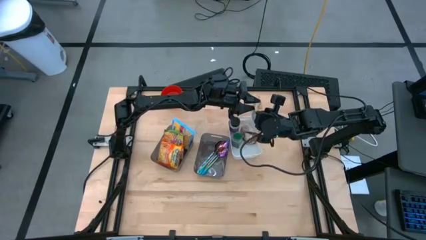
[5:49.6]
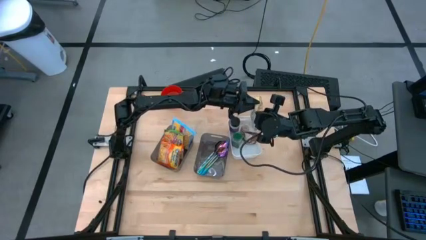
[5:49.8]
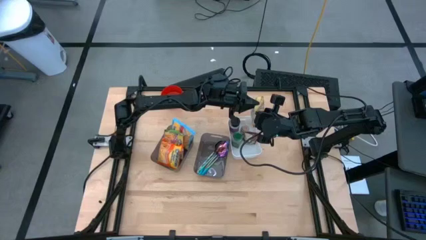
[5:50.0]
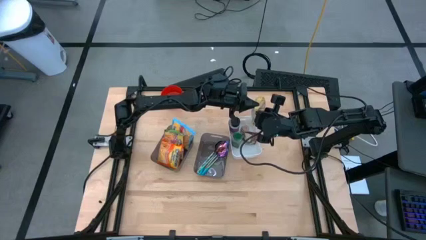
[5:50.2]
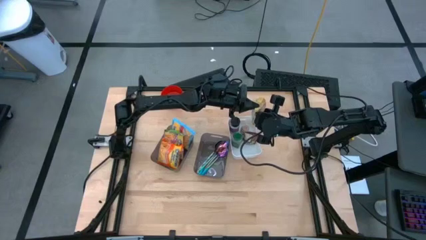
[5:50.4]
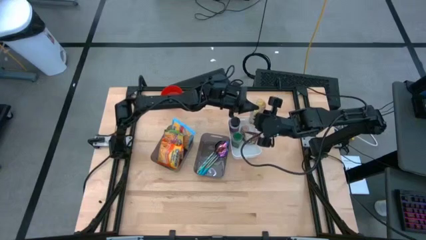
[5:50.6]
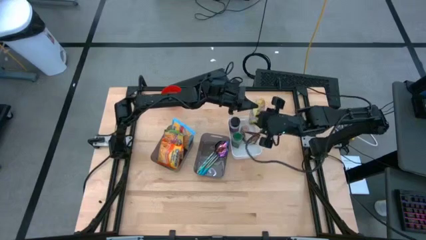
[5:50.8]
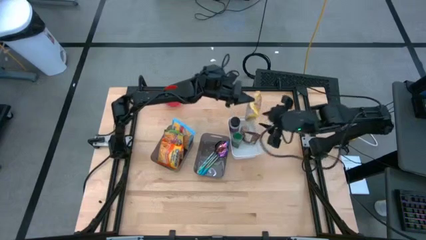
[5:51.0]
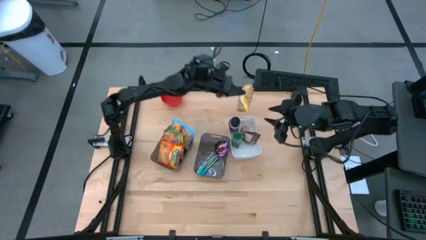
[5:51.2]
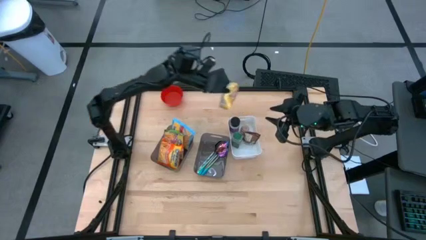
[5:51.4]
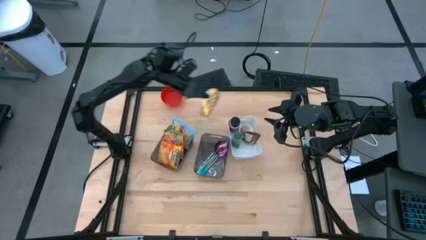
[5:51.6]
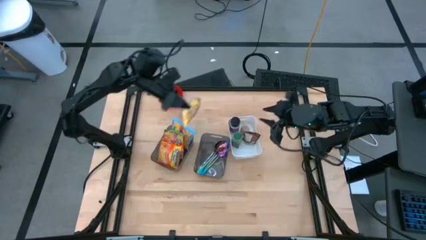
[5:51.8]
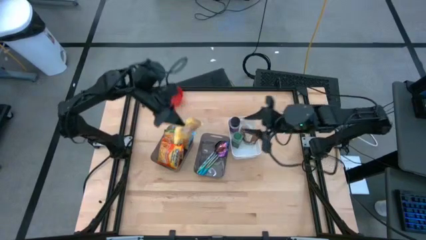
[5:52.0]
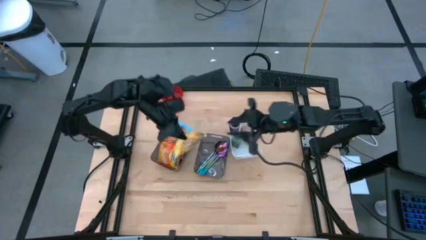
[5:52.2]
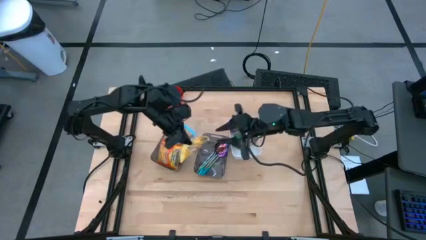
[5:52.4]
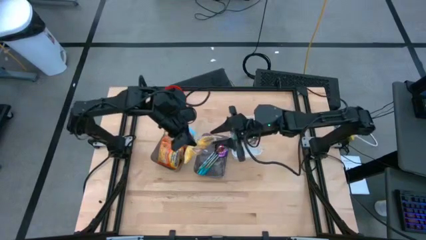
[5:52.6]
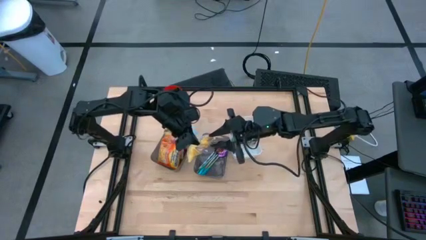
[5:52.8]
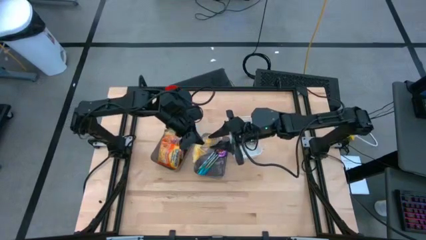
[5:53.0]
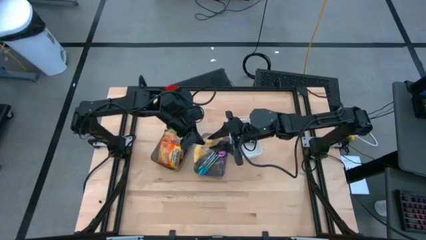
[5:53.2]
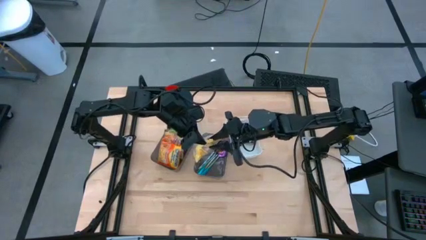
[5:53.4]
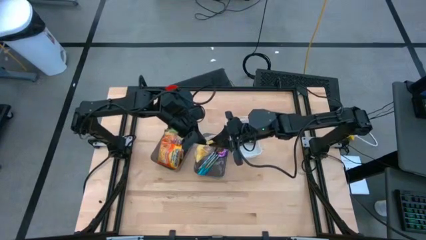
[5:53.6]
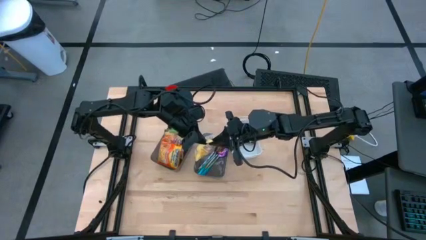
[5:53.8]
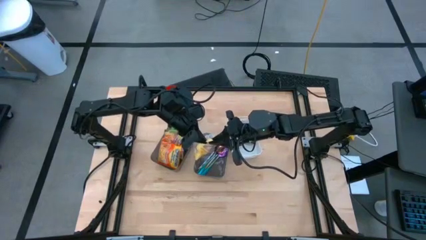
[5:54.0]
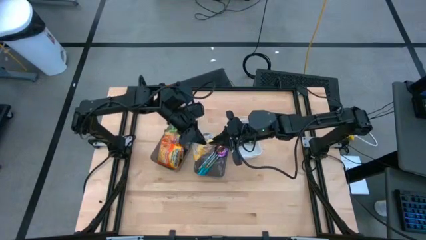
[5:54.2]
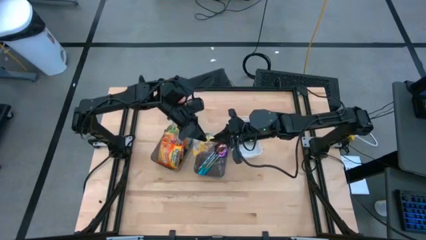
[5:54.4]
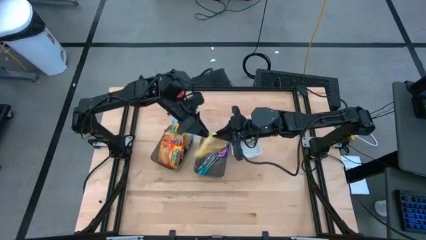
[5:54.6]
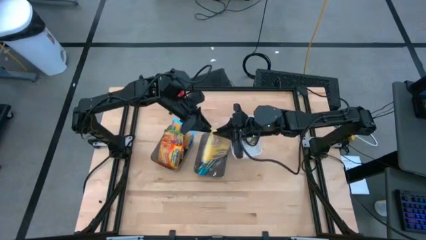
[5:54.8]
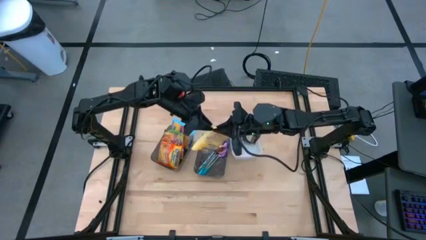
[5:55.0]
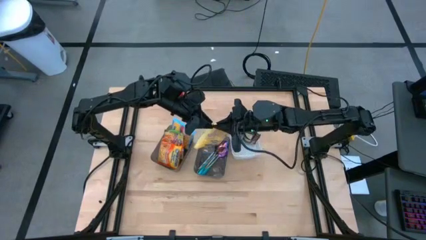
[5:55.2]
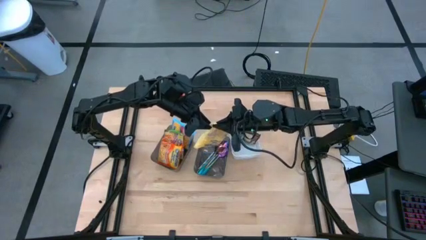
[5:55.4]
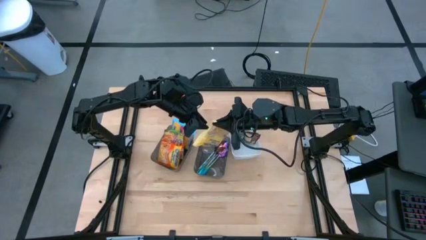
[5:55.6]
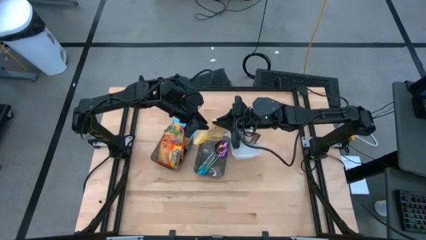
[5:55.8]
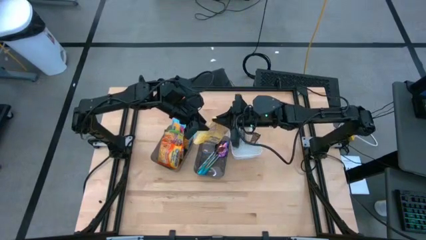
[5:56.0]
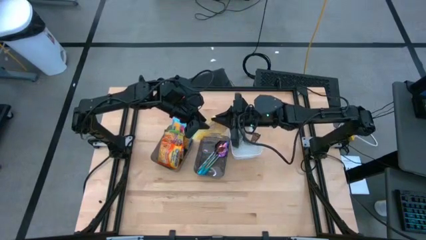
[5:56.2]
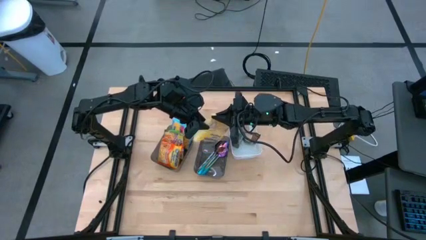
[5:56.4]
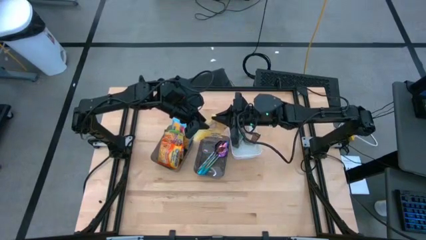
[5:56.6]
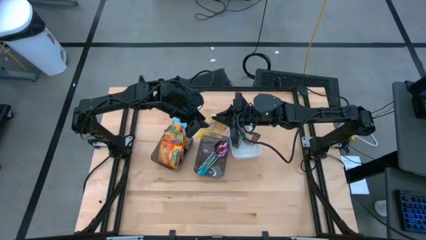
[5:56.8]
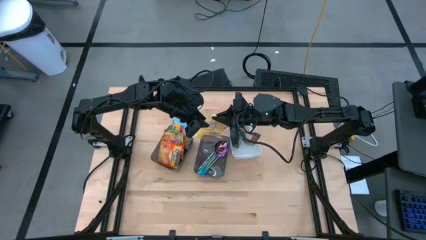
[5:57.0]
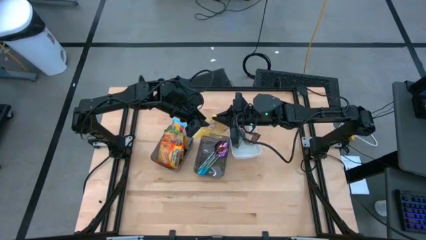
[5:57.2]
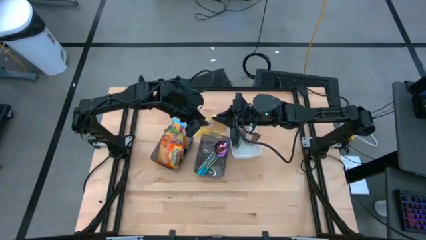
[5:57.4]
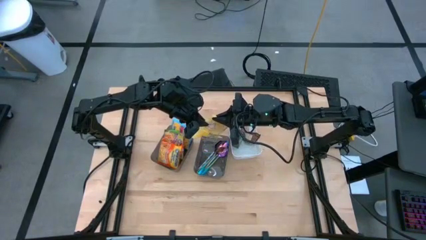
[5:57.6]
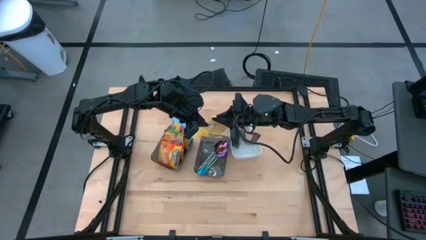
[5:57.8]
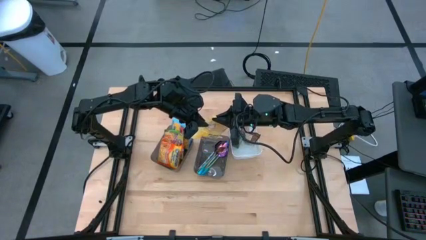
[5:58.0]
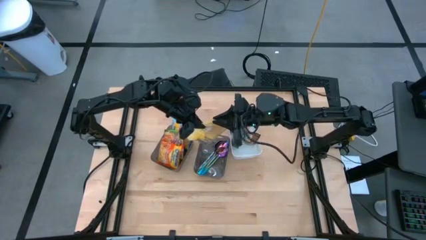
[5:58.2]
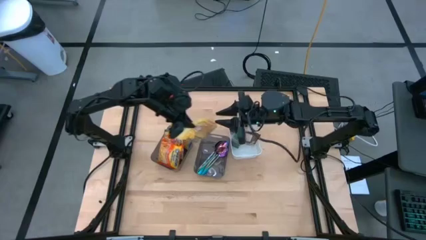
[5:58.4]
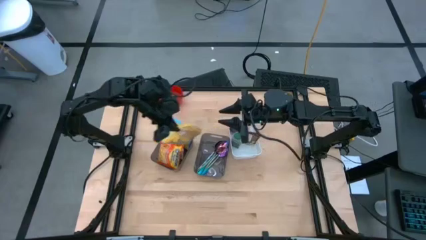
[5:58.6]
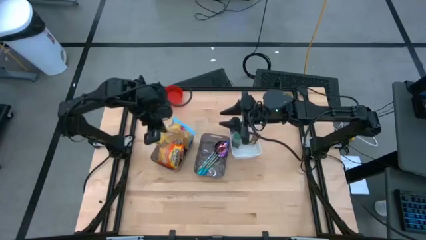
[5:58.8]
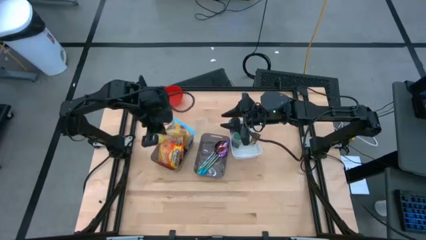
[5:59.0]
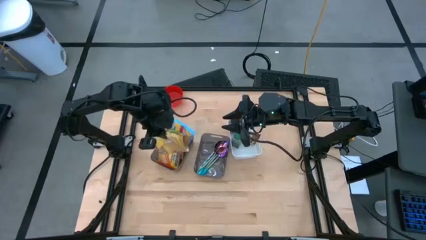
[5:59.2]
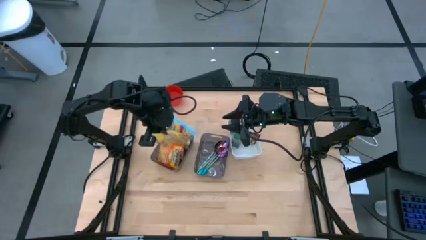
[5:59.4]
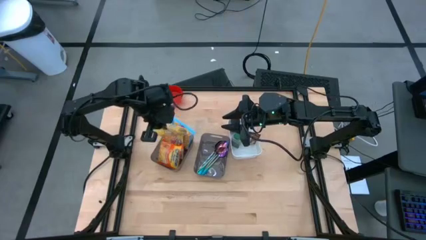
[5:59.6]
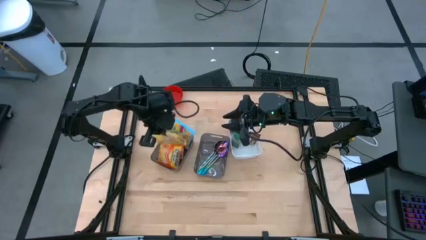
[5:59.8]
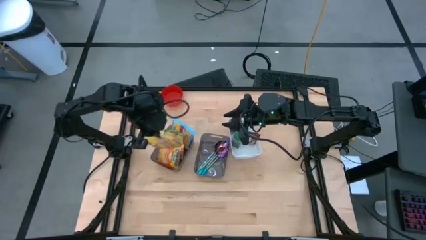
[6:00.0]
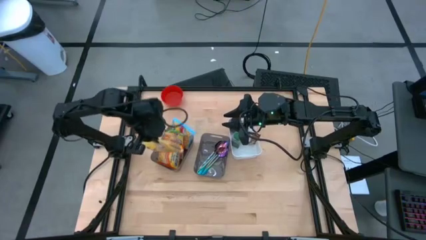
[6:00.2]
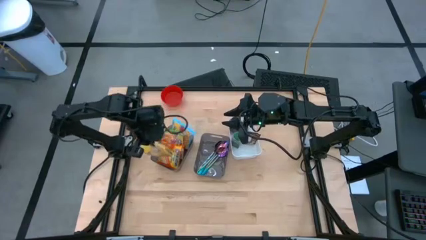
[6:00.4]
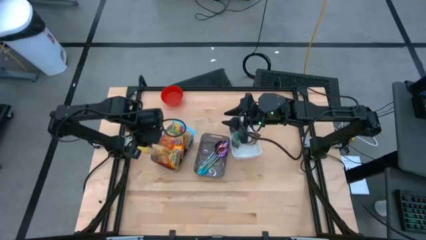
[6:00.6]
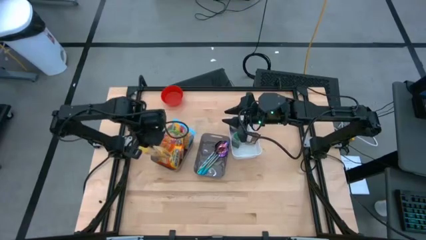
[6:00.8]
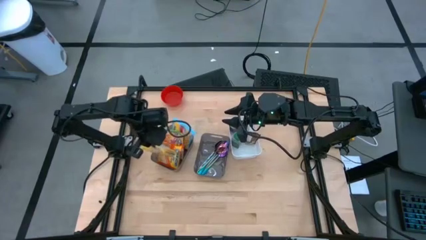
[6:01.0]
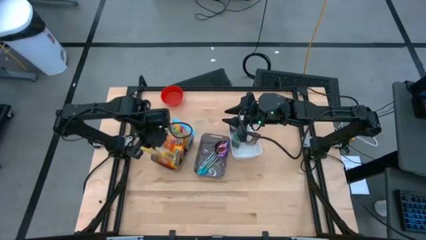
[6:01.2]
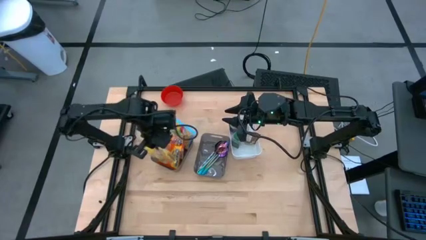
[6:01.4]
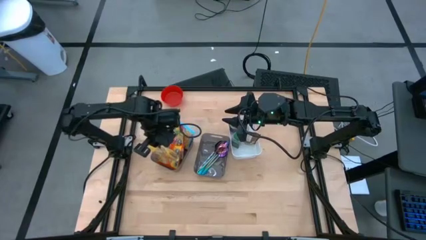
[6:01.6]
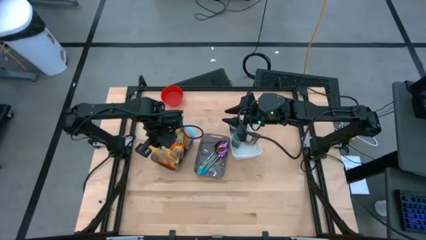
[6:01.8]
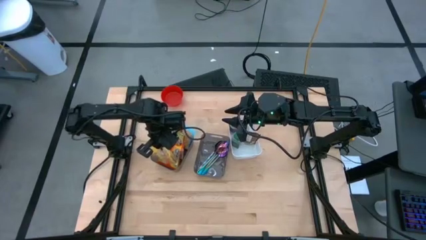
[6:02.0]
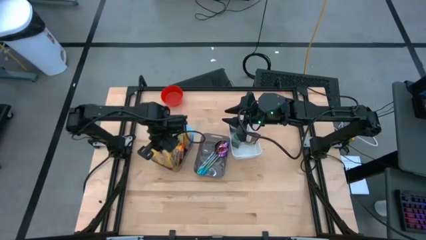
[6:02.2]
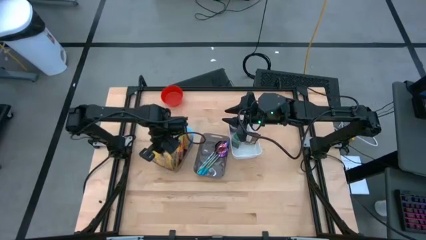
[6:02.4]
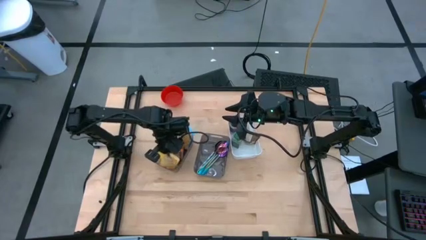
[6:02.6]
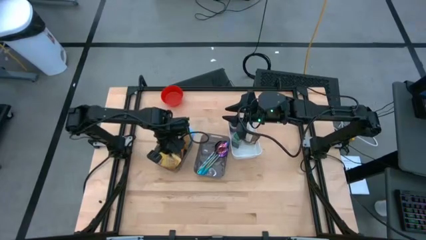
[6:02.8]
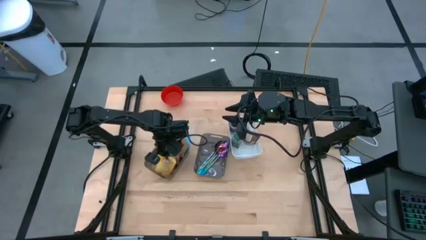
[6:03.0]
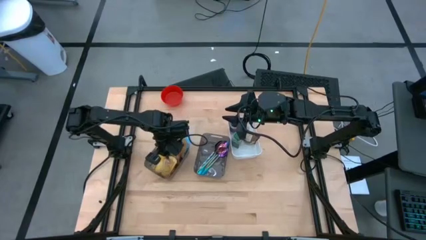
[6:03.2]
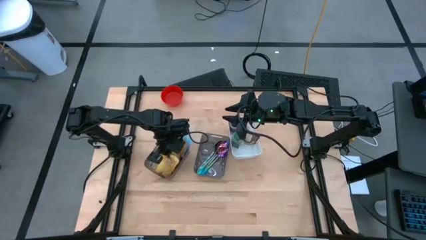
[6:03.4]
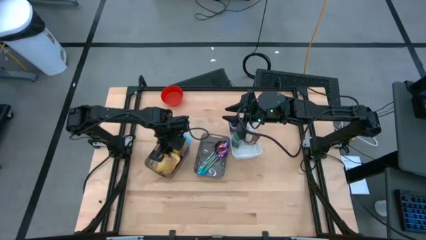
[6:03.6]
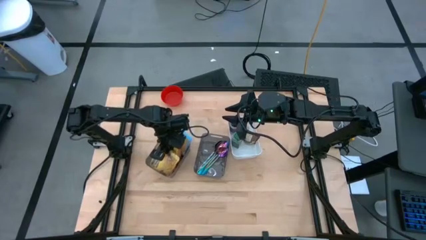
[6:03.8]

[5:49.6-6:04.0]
Task: Pick & Place Food Item
Put the yellow pack into the left gray bin

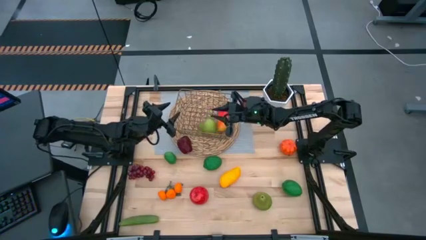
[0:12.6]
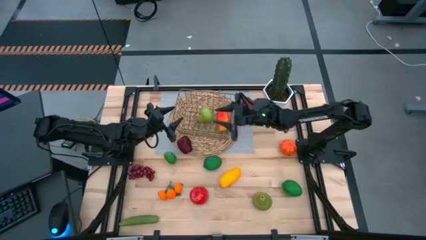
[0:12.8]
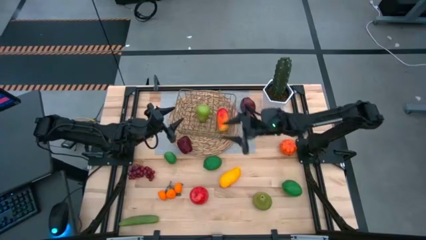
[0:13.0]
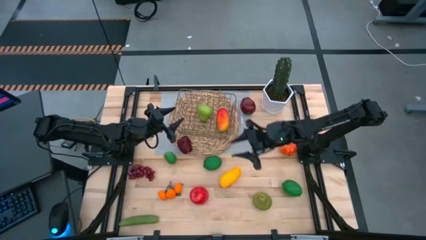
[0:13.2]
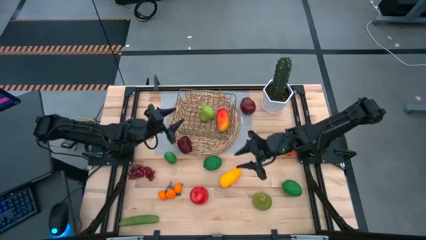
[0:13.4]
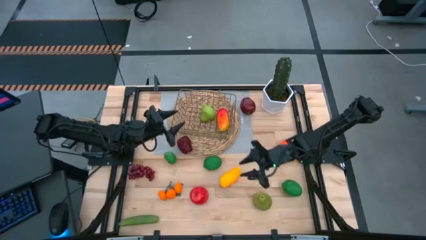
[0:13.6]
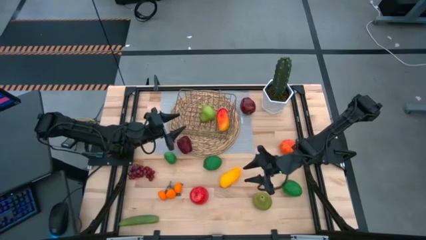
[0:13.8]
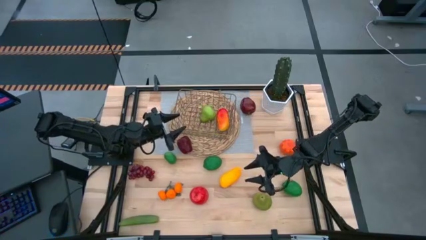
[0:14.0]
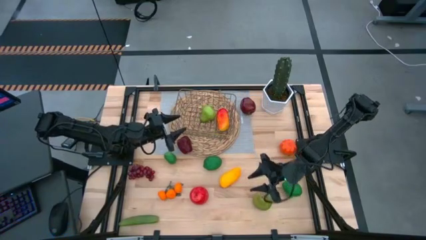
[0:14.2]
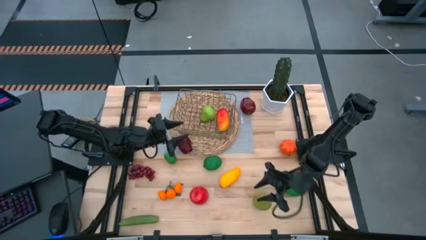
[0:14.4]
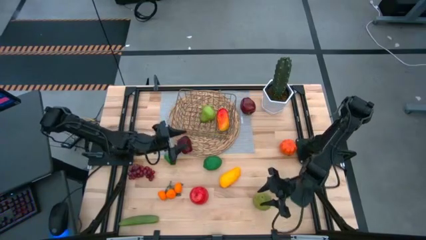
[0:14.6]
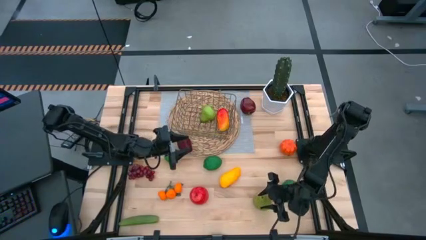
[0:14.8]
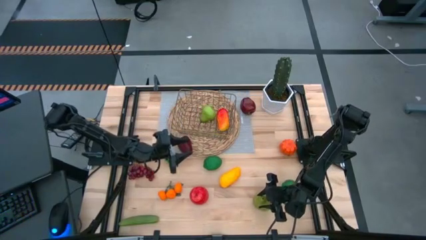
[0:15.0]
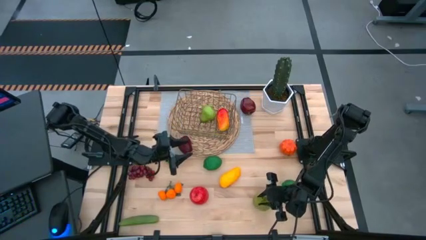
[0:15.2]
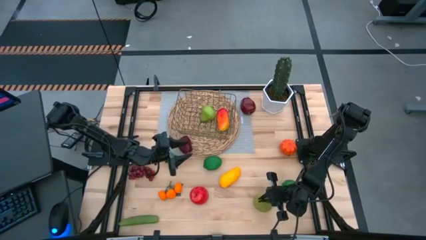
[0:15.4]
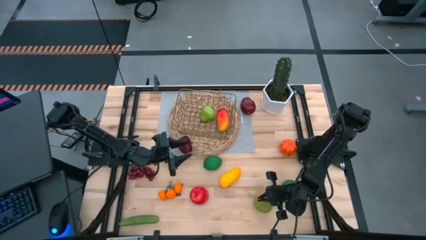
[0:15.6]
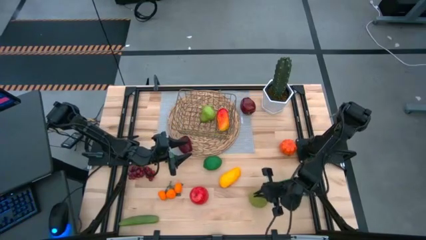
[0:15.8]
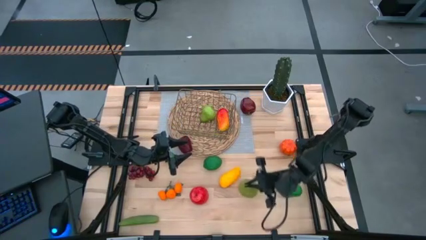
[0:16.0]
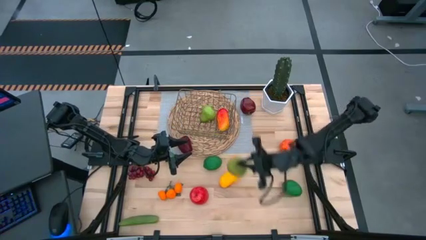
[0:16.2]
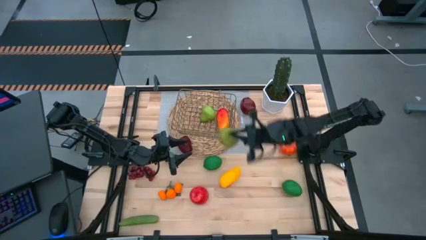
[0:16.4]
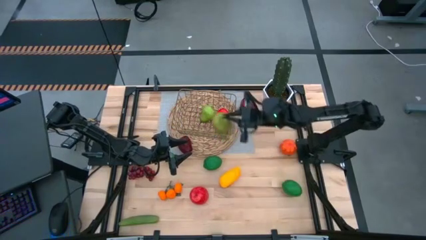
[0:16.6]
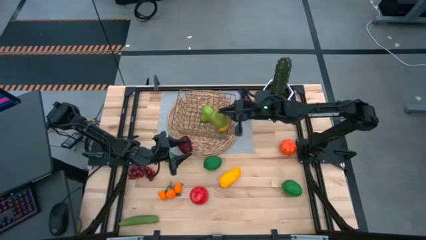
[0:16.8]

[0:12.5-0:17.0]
Task: Build produce basket
Put the green pear into the gold wire basket
